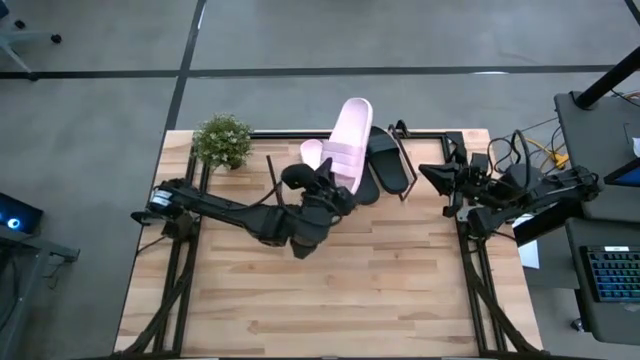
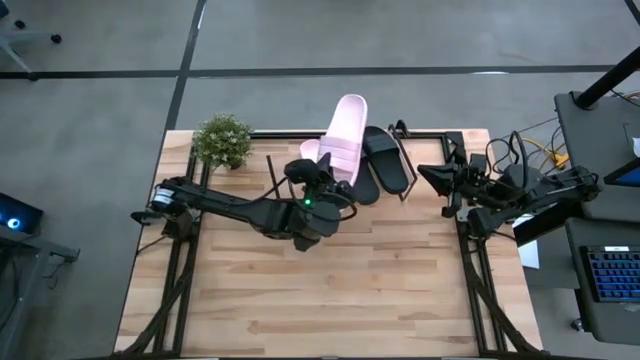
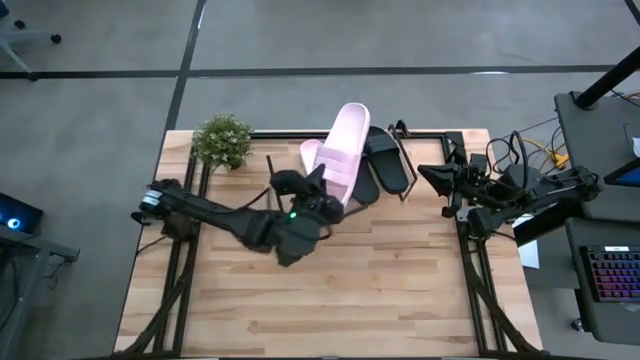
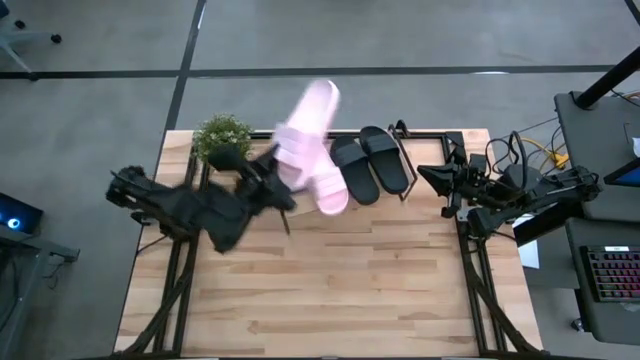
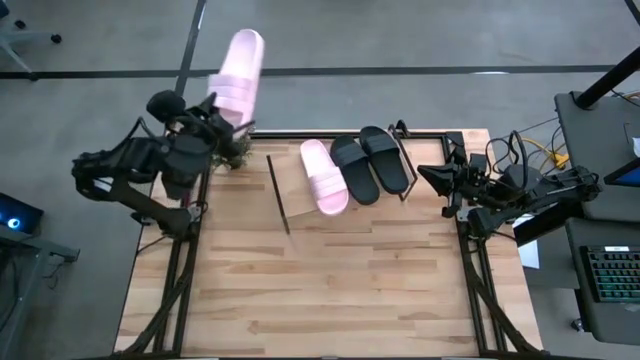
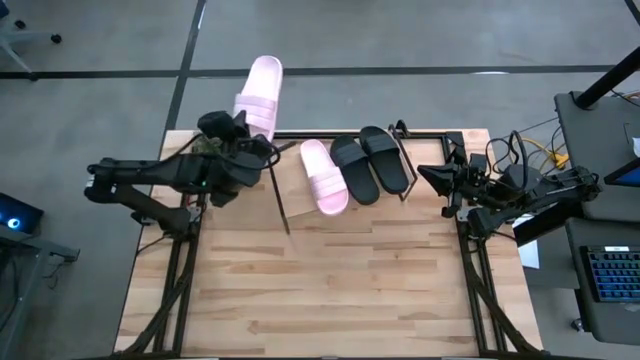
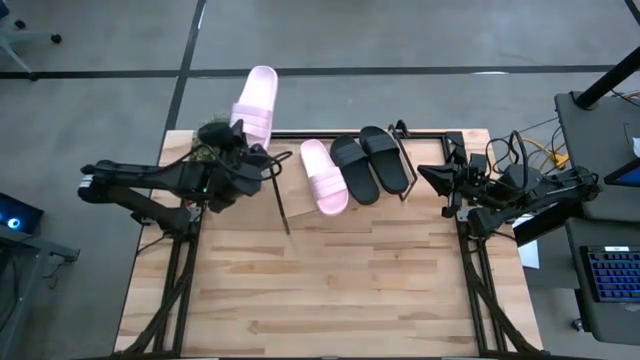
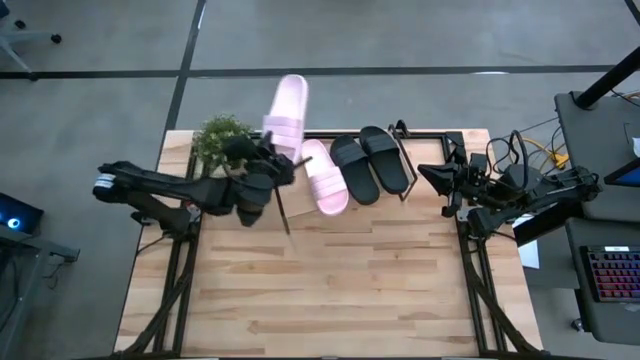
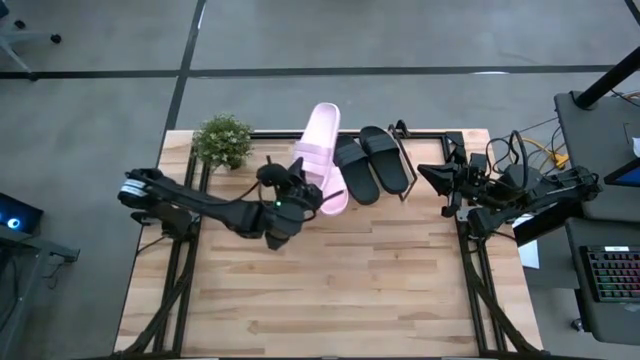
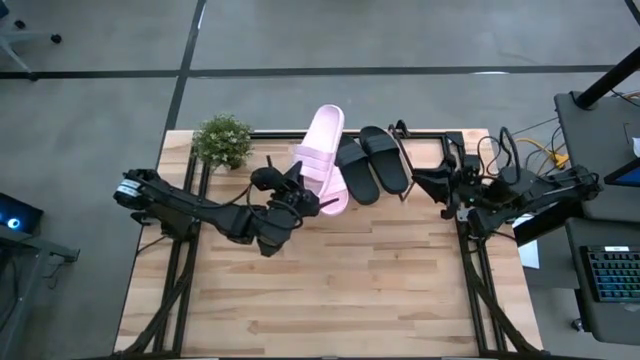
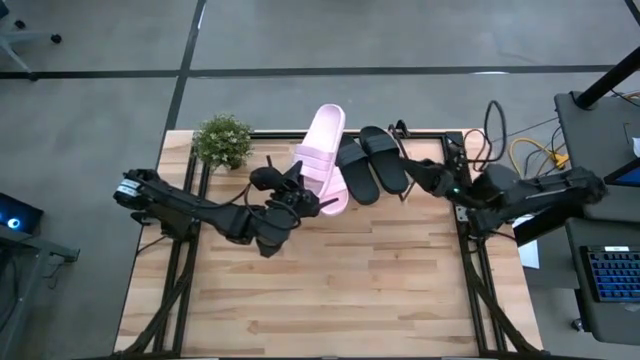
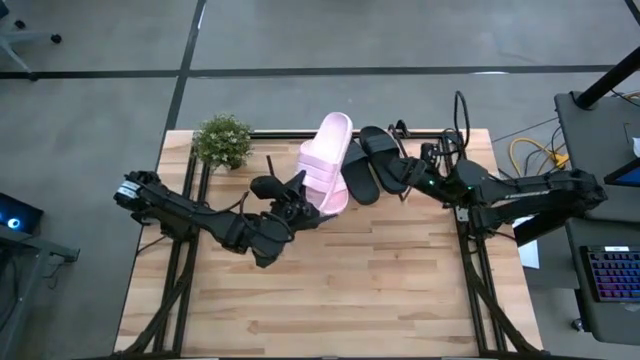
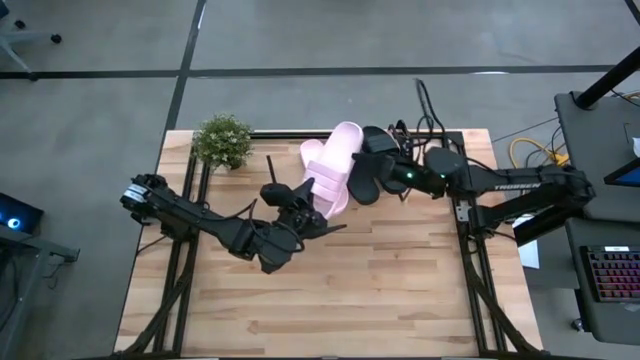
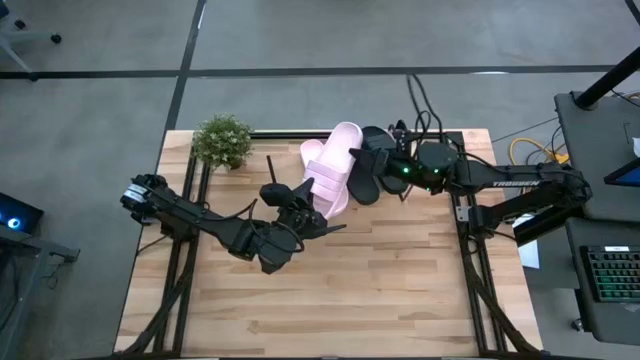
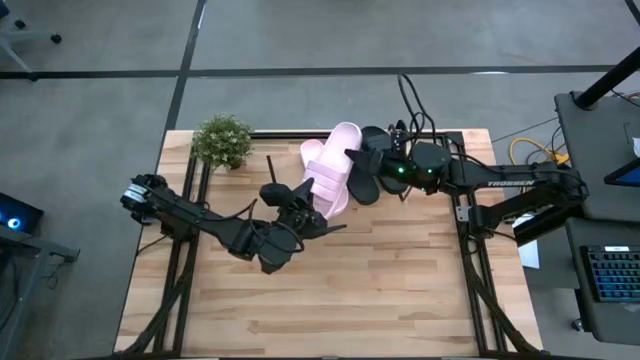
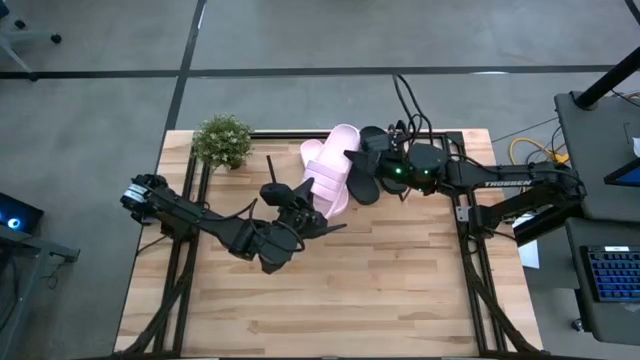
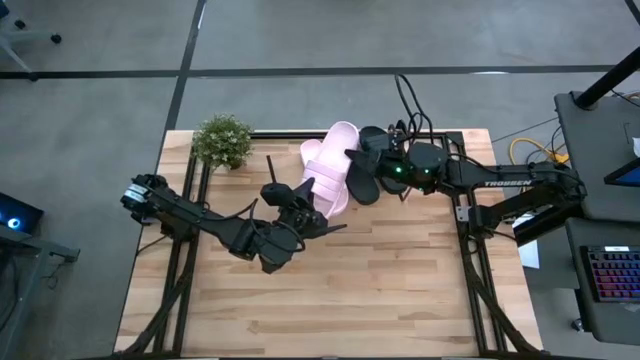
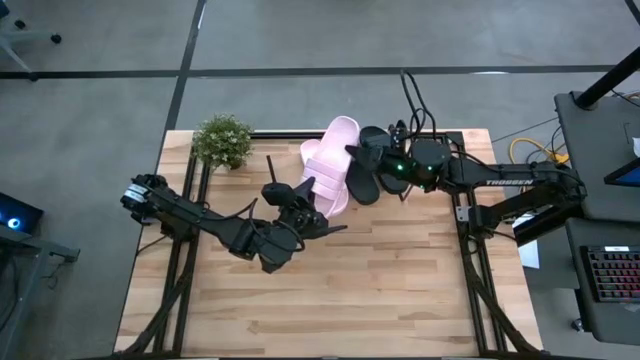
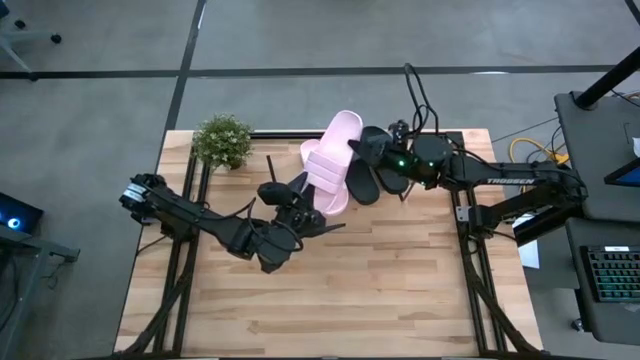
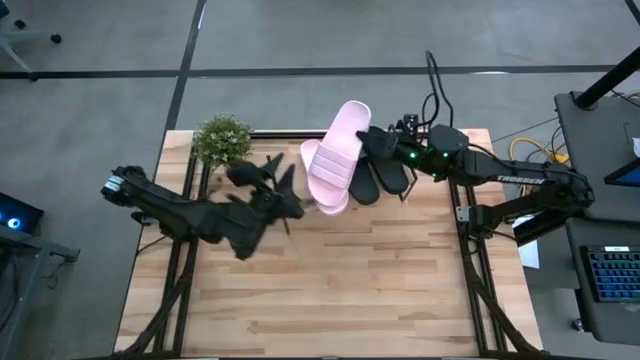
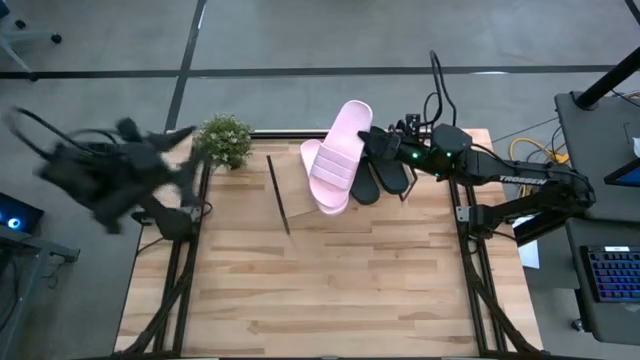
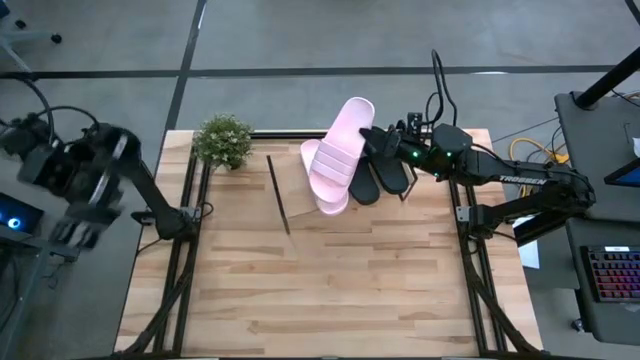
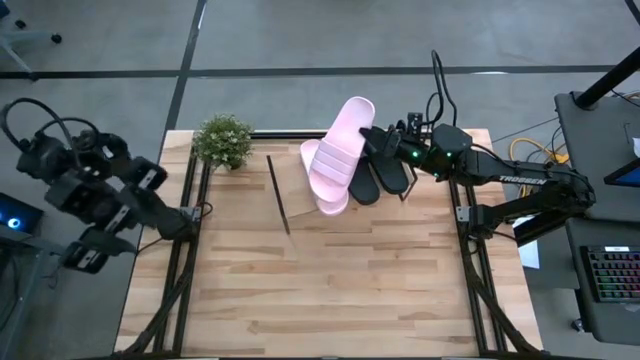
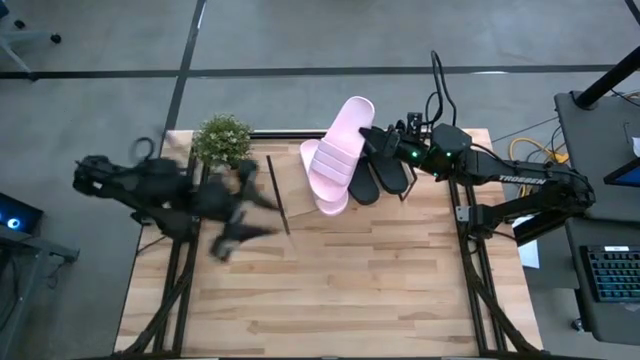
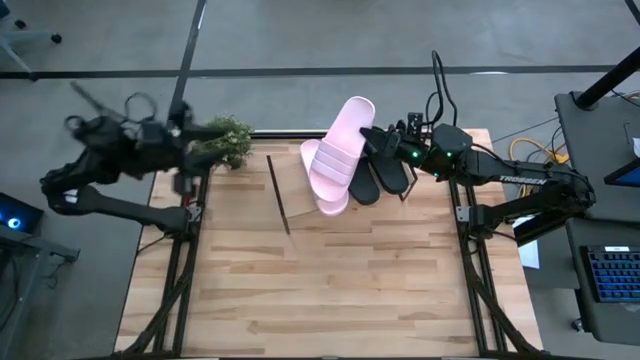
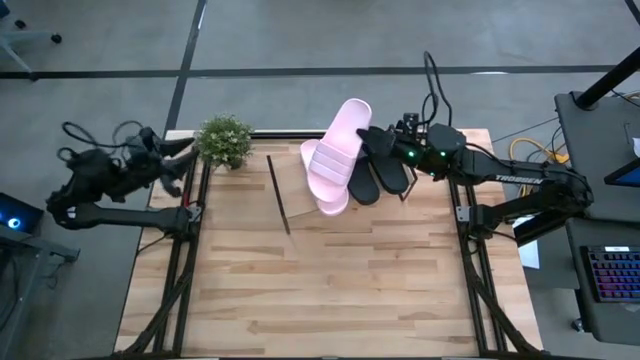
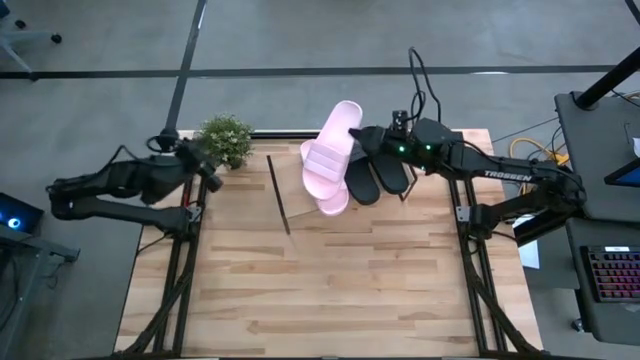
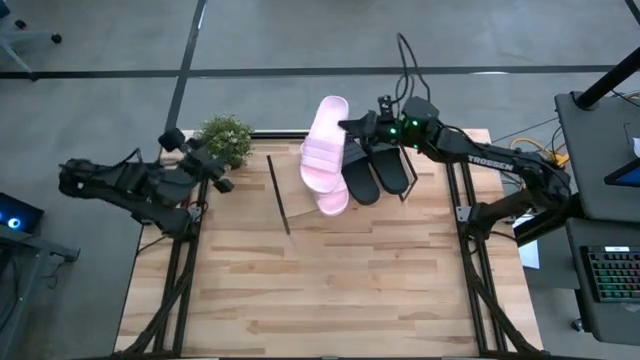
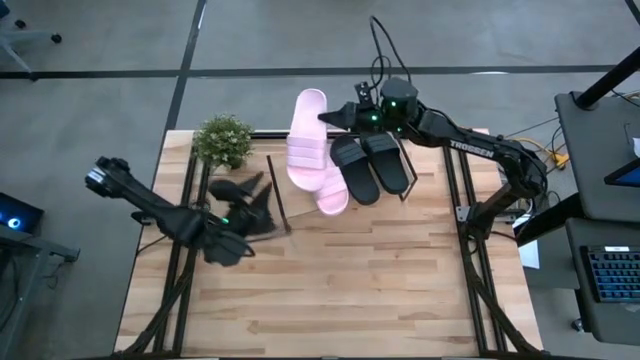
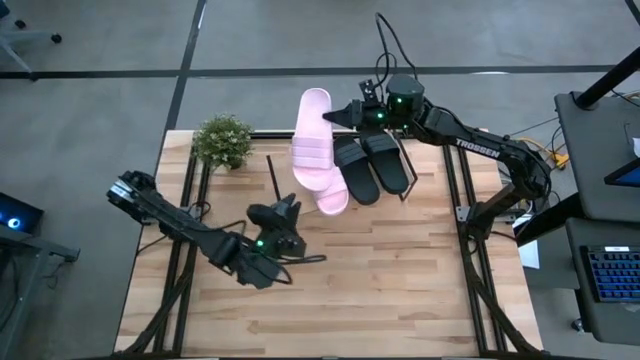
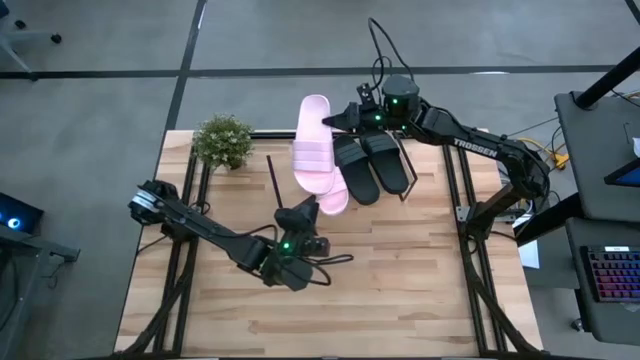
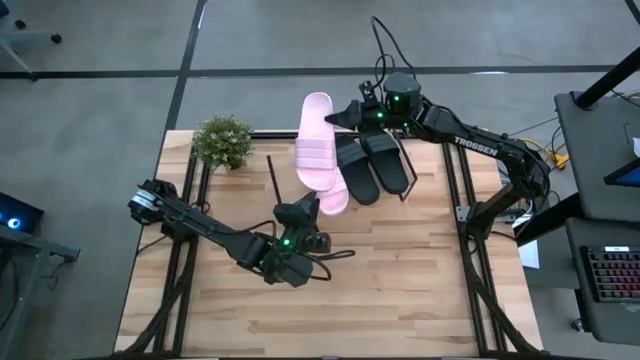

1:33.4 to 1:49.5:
Task: Pick and place slides into the shelf
Put the pink slipper on the shelf
